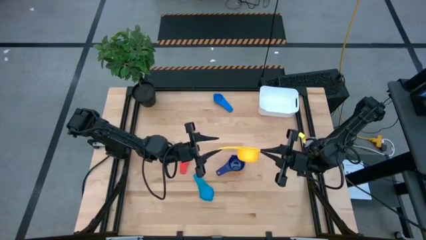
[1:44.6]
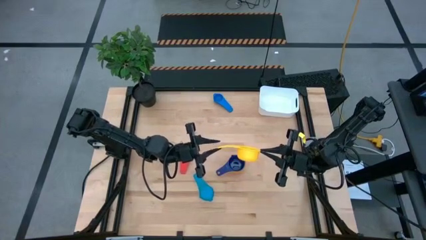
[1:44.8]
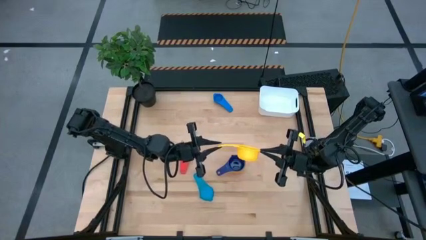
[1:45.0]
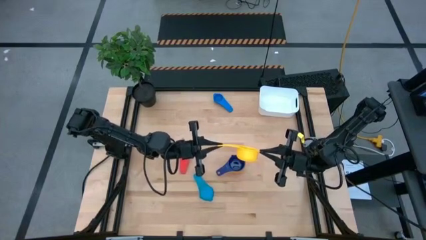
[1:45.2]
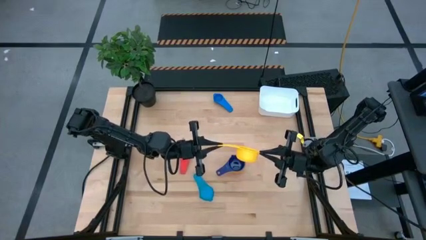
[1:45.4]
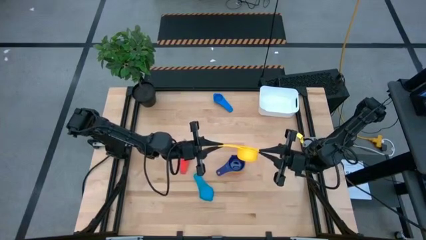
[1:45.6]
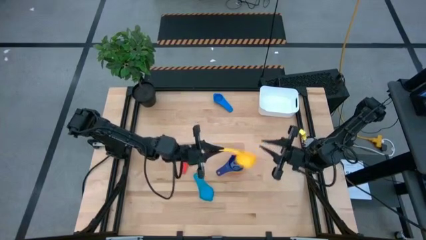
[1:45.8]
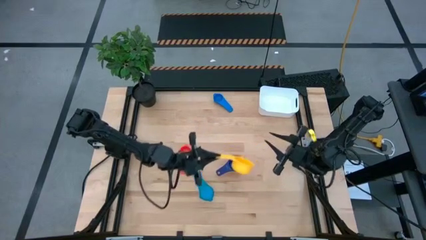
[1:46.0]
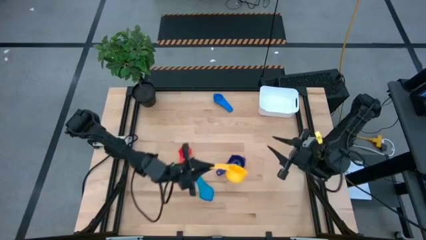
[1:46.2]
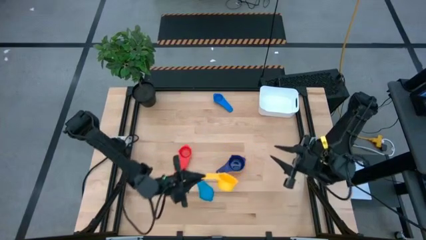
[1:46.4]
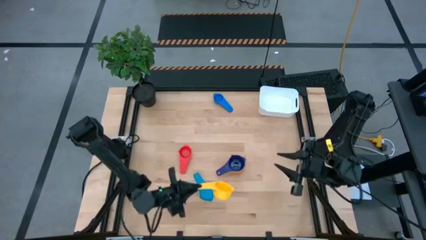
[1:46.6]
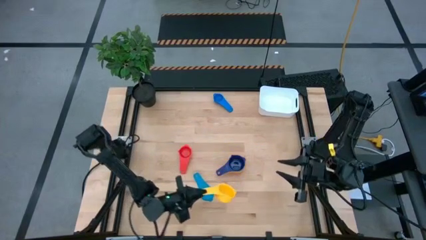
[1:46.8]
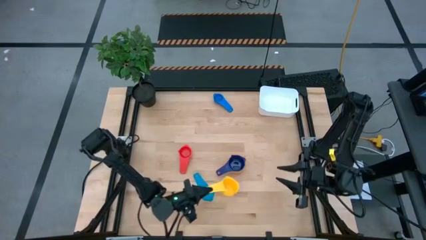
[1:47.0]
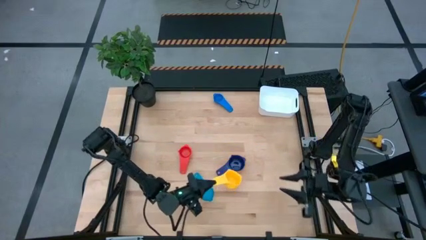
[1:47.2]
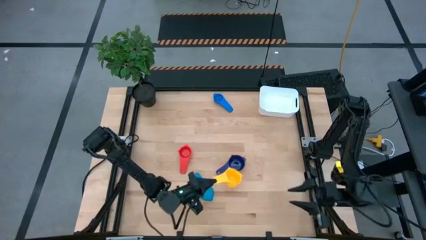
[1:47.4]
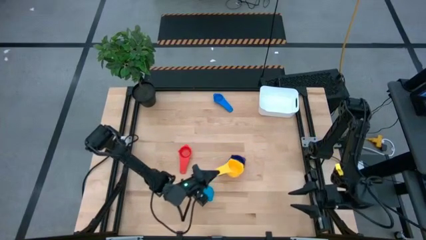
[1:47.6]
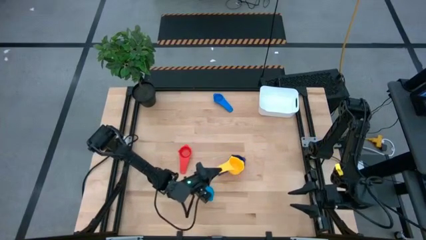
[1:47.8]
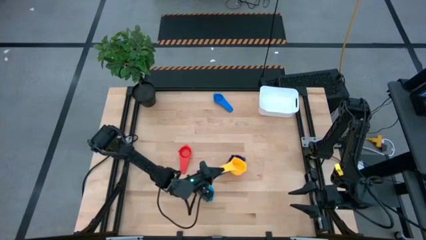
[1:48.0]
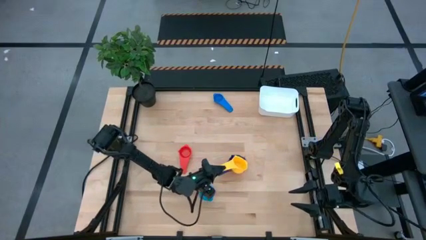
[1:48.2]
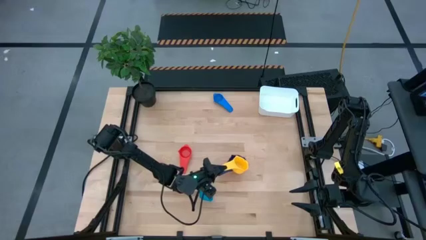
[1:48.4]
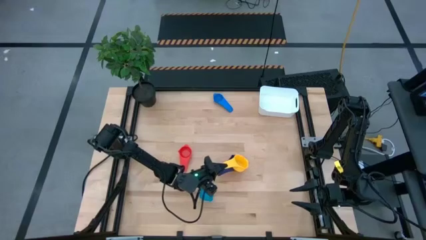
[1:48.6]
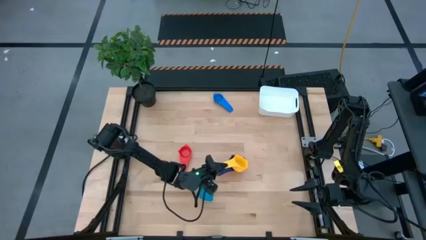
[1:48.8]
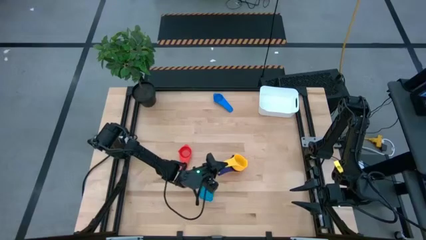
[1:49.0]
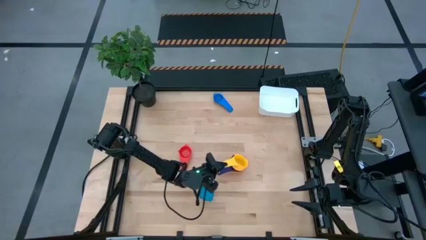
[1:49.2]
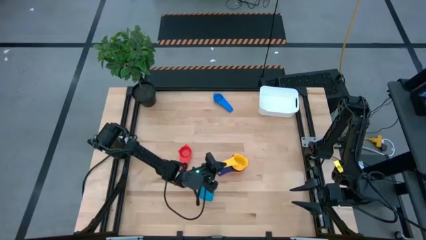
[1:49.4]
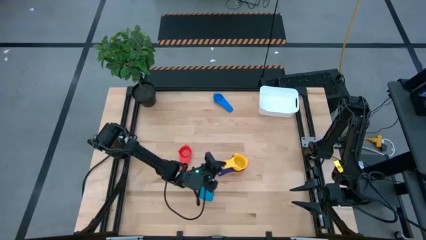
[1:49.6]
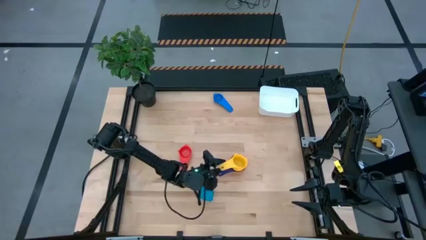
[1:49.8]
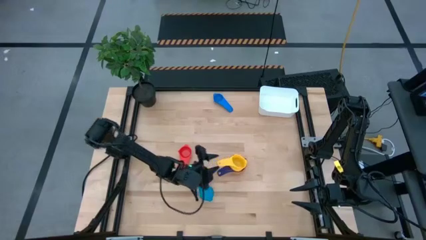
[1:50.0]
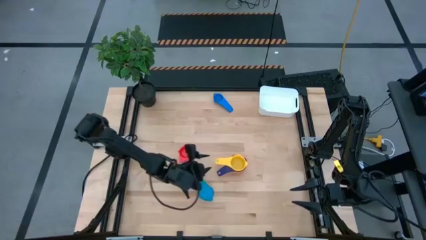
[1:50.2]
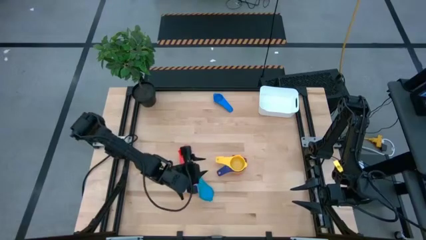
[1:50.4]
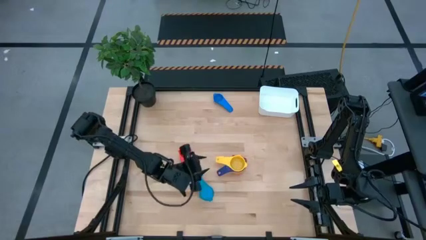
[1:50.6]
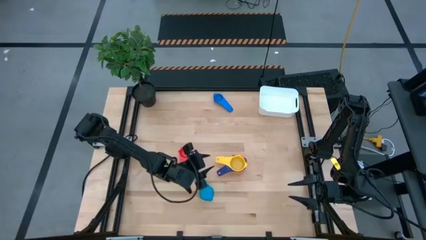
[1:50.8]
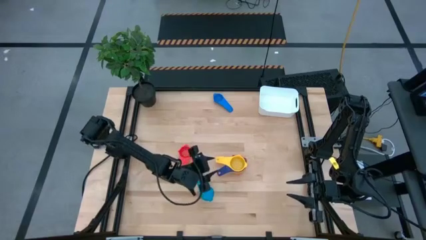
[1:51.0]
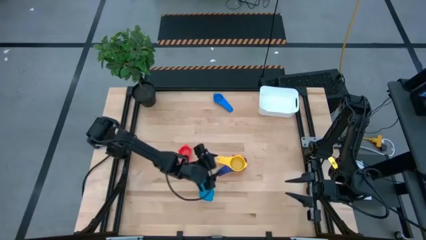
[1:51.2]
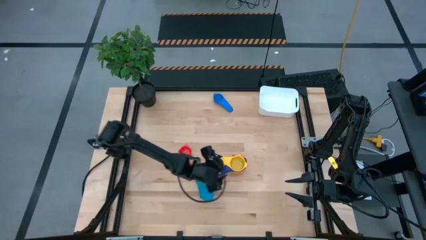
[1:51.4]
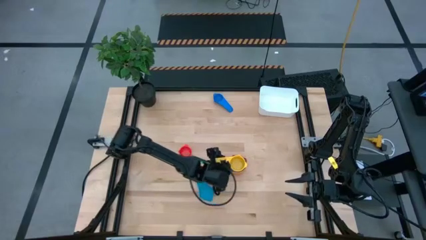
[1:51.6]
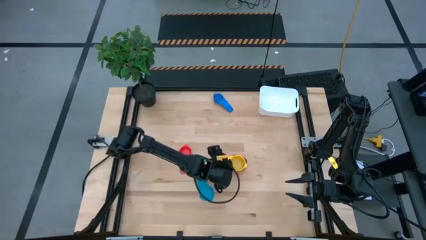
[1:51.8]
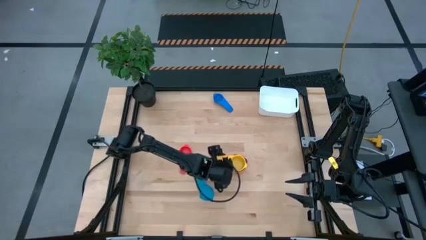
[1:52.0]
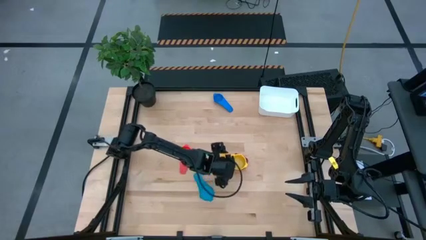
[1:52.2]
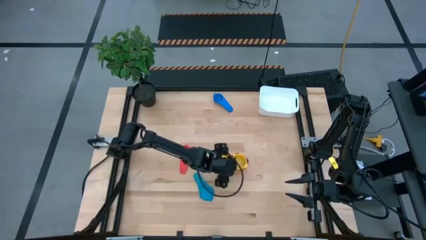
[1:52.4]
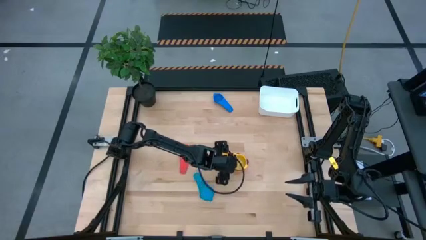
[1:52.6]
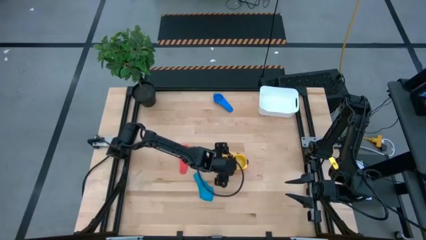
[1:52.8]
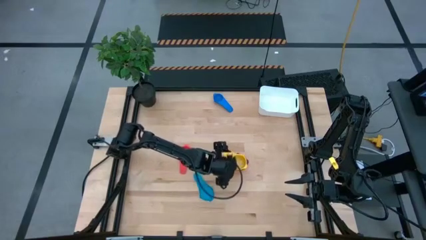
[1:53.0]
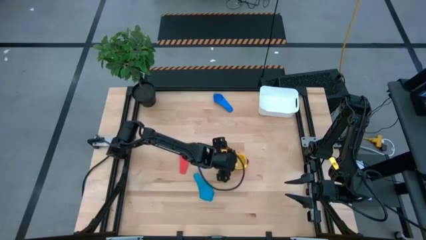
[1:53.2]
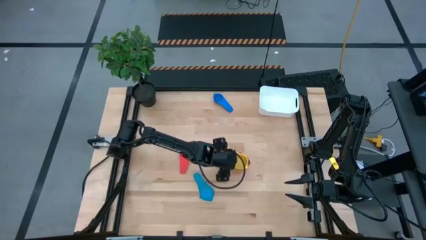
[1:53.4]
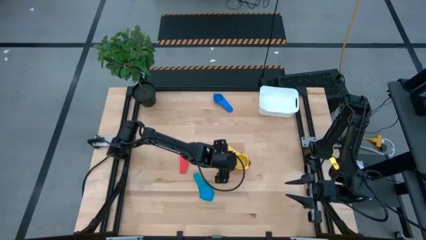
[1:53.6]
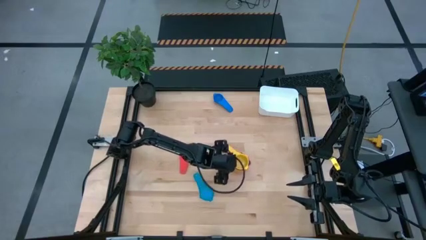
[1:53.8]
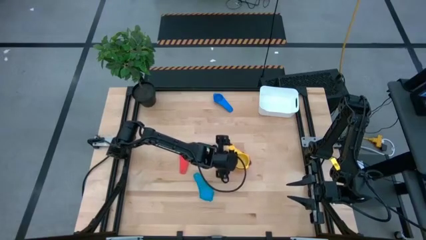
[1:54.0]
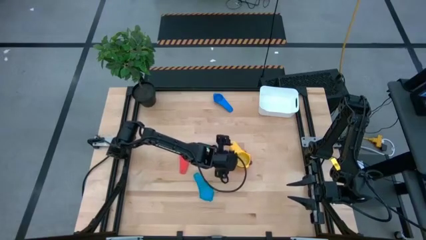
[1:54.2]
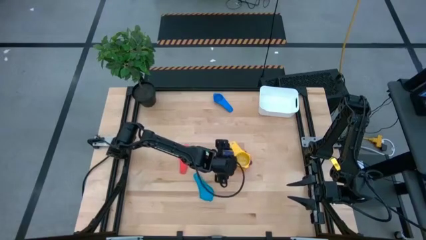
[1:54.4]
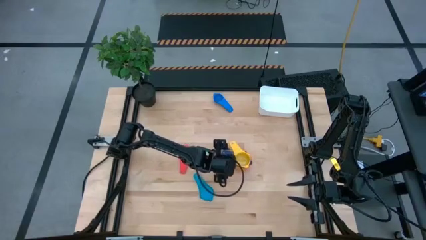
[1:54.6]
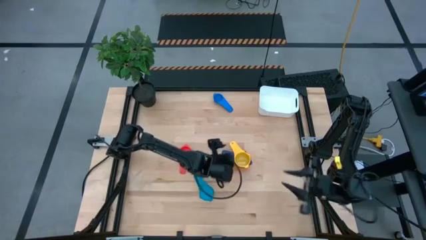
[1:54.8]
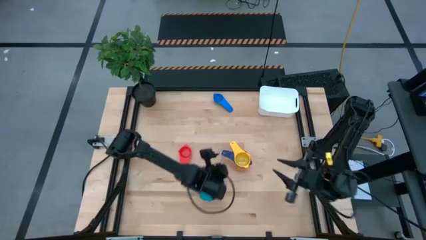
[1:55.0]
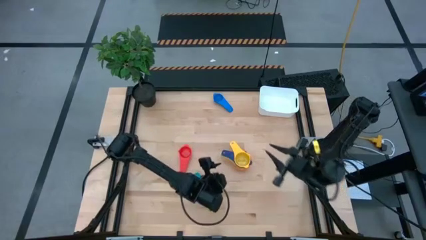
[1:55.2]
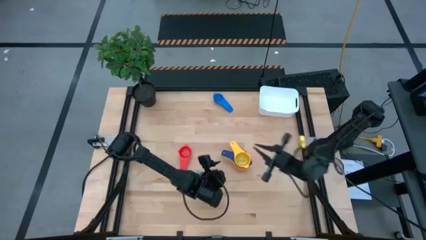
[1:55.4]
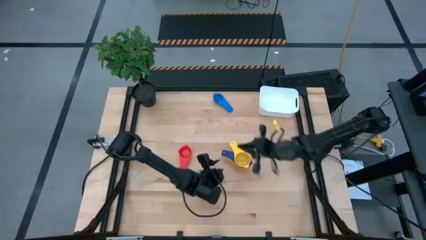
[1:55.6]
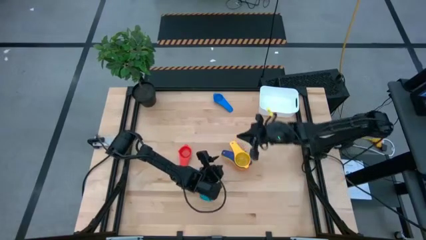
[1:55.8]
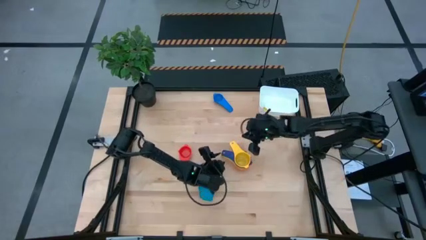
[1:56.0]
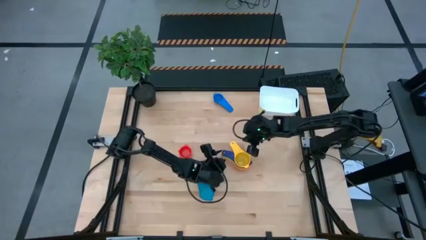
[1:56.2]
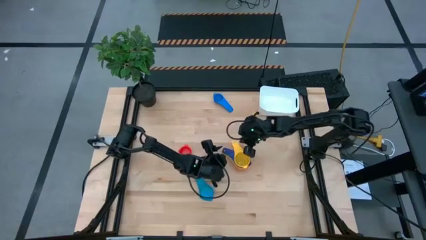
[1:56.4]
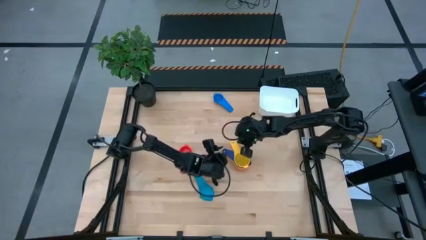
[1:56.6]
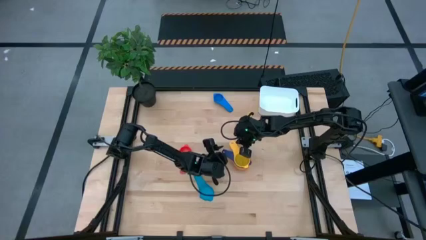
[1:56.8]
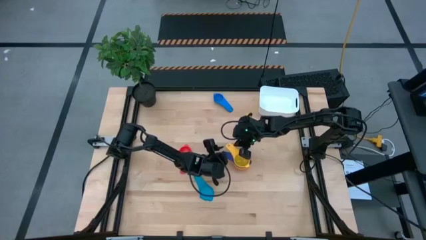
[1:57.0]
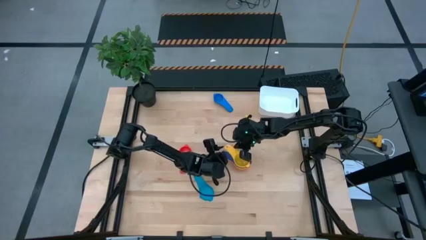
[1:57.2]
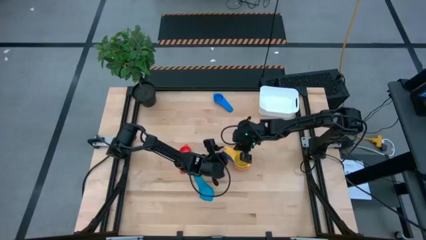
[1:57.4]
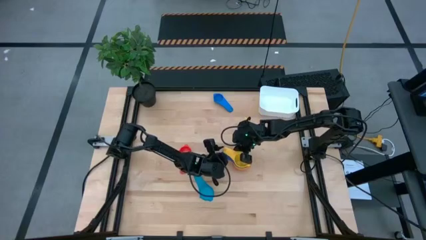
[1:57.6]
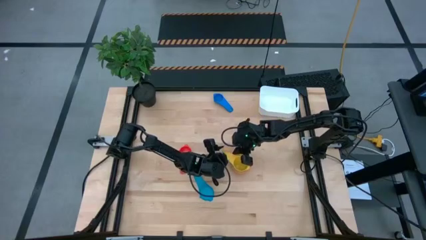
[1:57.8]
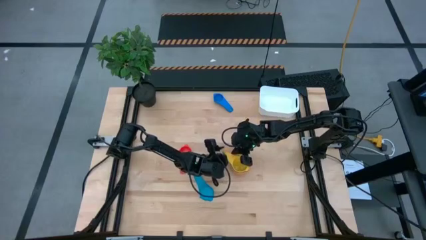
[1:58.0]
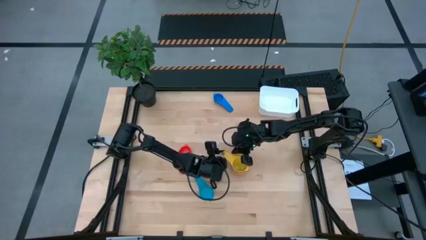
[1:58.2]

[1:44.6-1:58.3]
Task: Nest measuring cups in basket
Stack the yellow measuring cup on top of the violet measuring cup

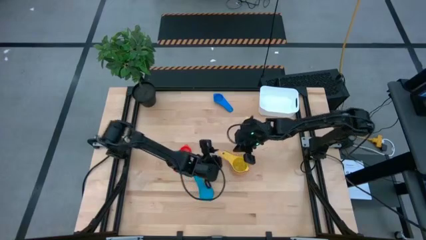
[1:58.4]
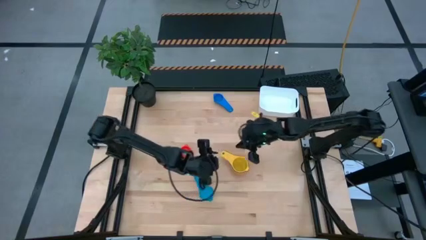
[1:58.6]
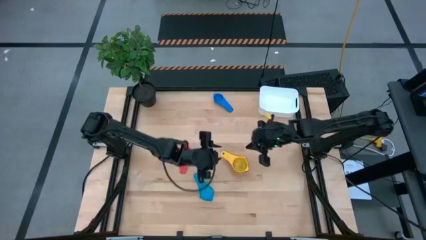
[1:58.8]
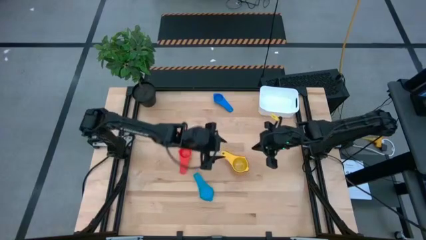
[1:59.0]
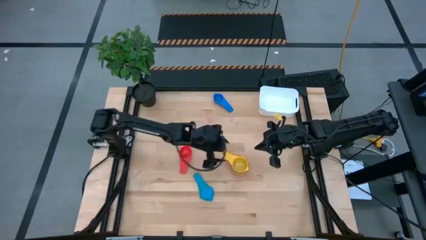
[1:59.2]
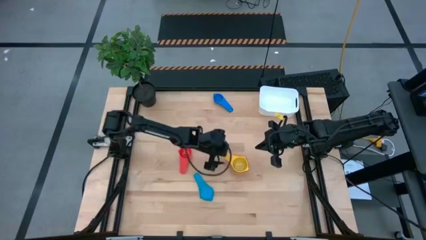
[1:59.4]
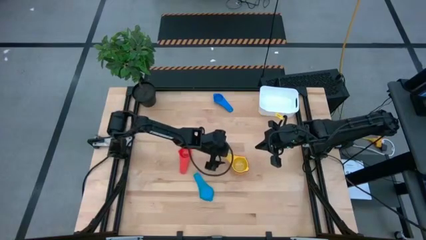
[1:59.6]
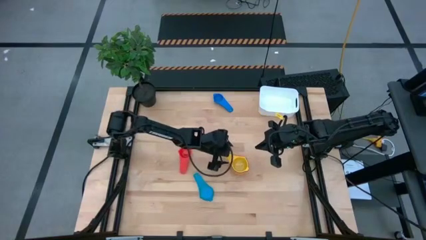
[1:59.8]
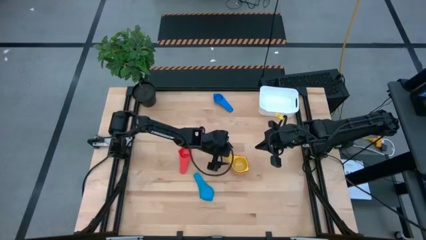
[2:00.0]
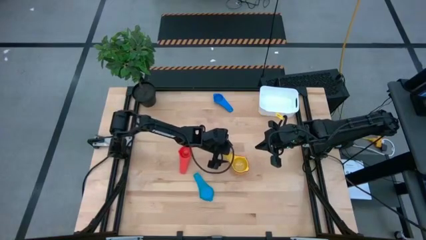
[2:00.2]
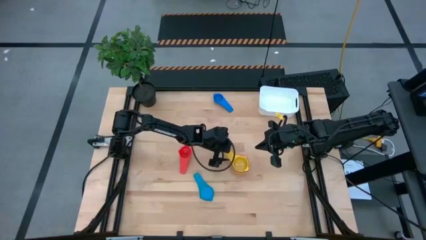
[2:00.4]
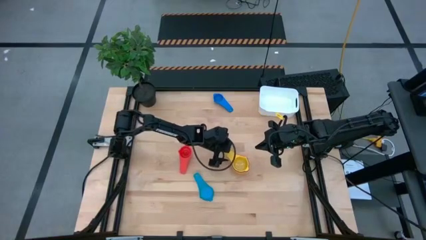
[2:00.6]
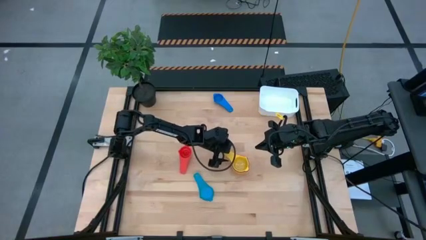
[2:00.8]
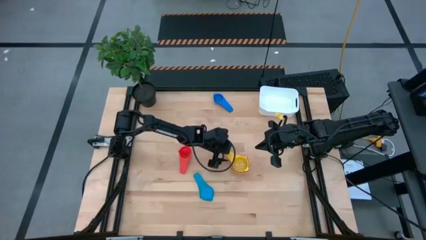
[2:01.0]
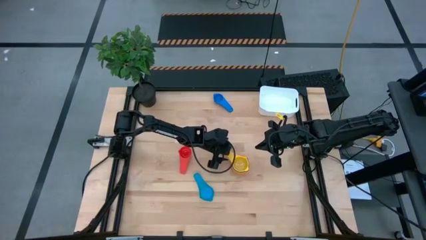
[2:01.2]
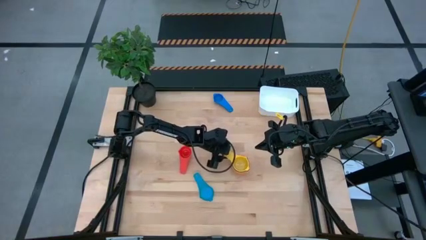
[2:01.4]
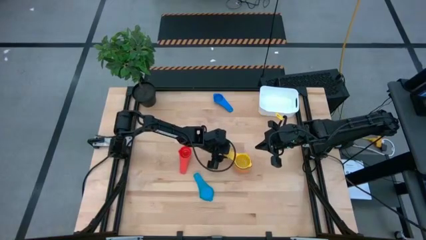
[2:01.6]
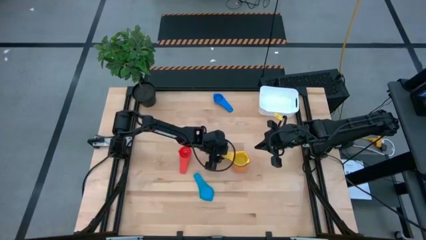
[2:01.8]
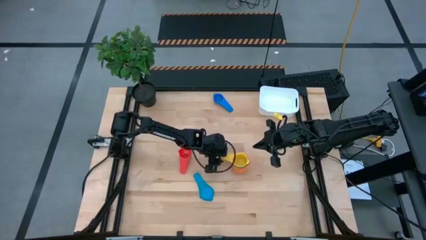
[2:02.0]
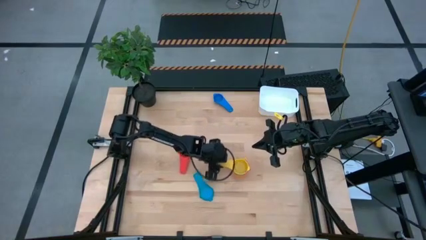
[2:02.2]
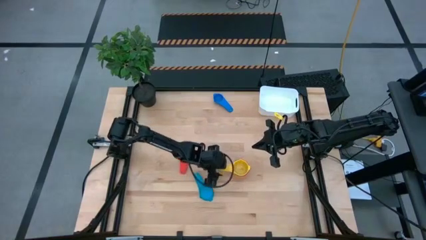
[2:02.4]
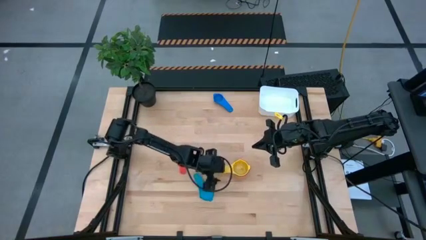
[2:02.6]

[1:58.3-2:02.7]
Adjust the measuring cups
